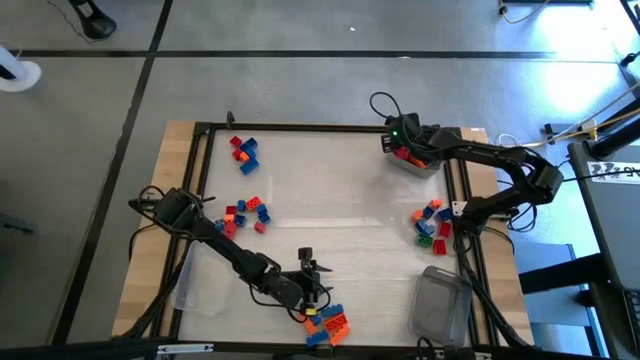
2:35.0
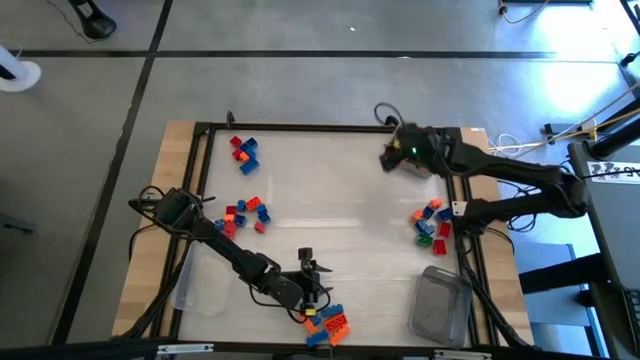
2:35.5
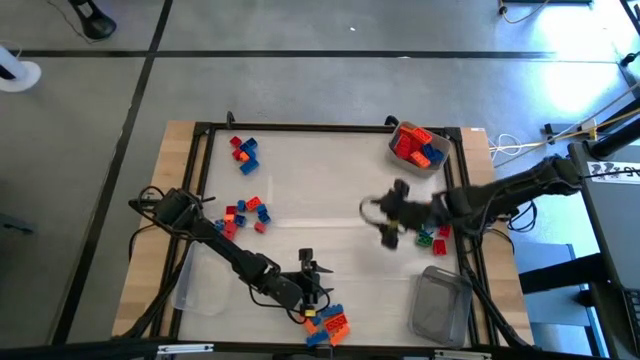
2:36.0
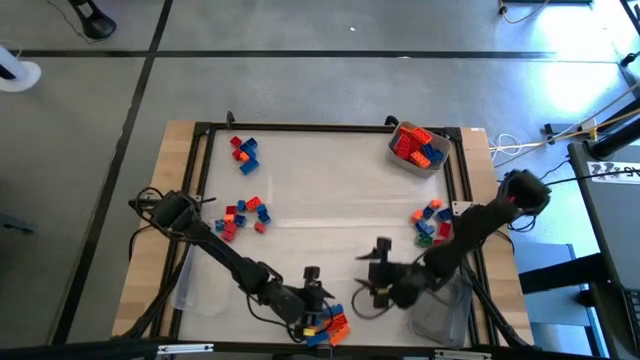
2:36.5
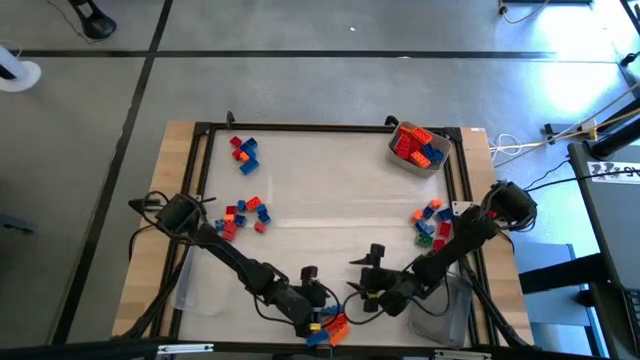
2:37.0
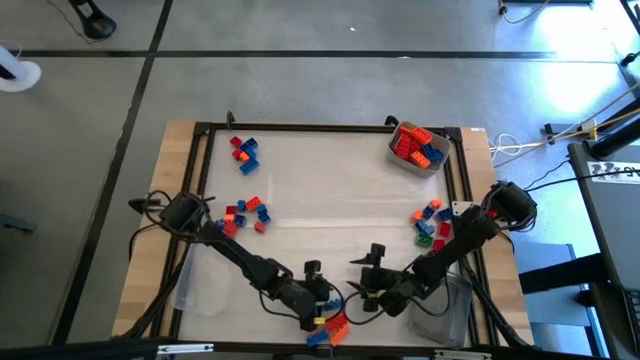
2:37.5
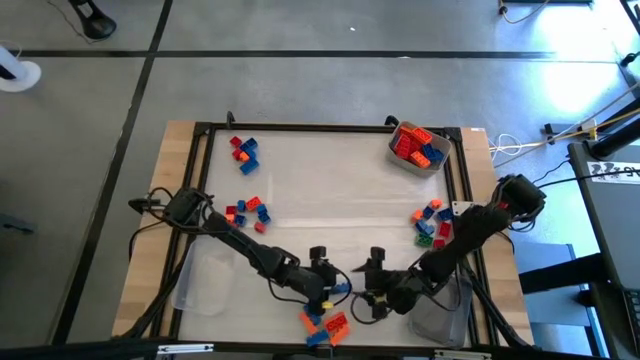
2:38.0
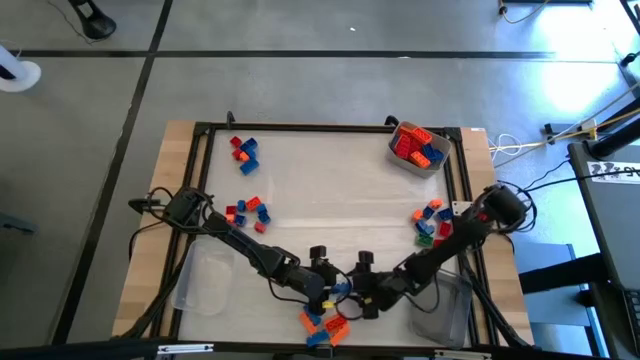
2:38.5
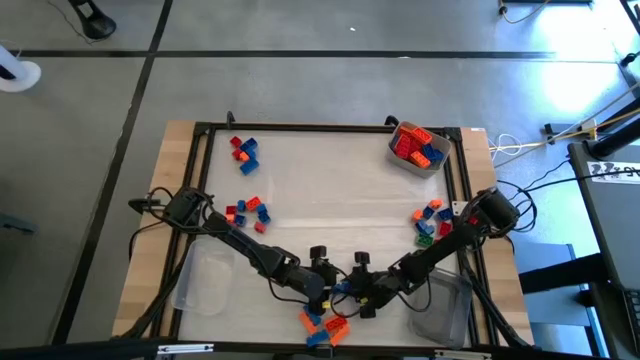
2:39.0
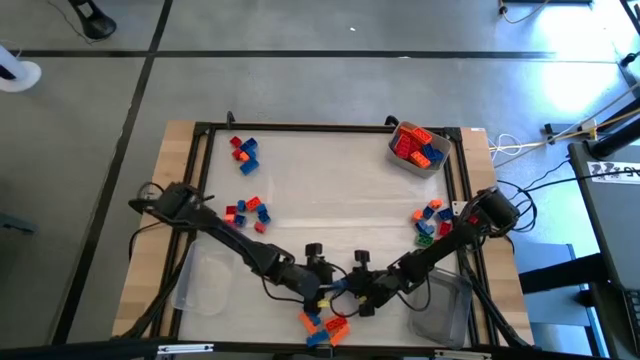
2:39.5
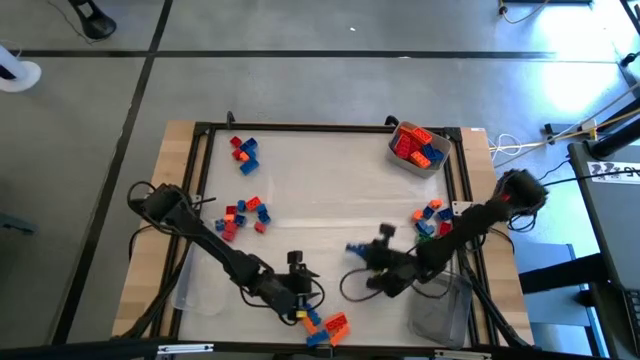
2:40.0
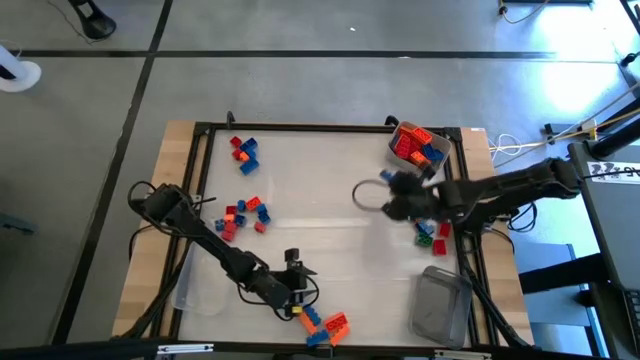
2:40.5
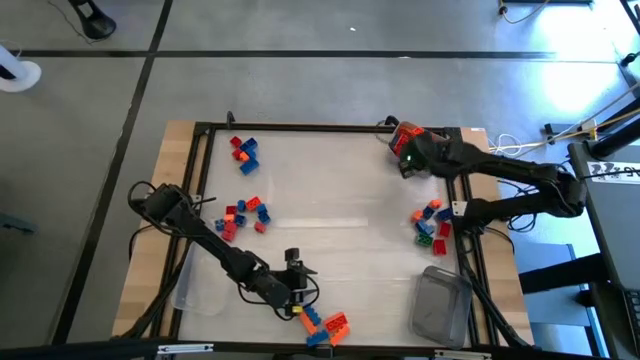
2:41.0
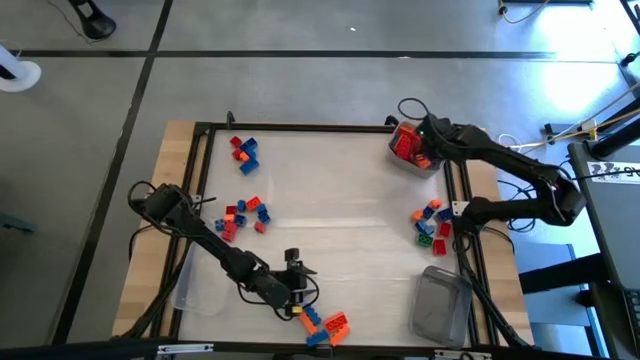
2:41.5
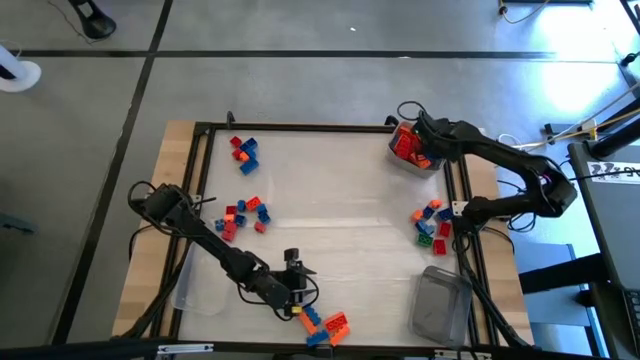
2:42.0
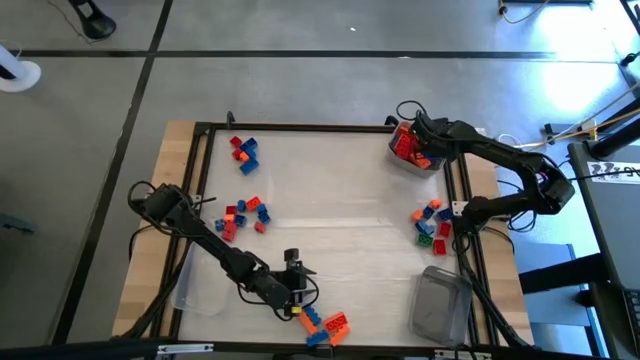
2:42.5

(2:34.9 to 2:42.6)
Task: Sort blocks by size
Put the blue game piece into the gray bin

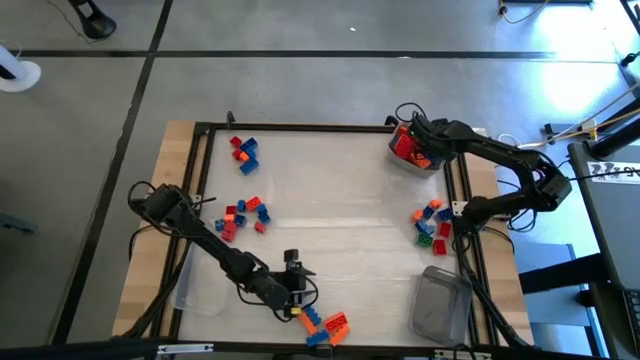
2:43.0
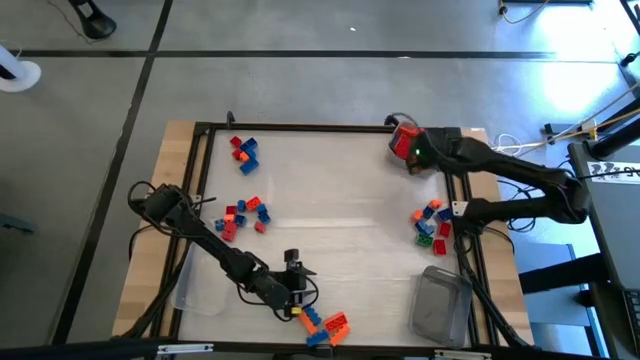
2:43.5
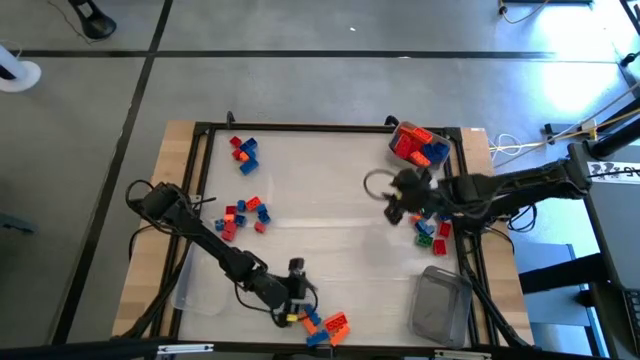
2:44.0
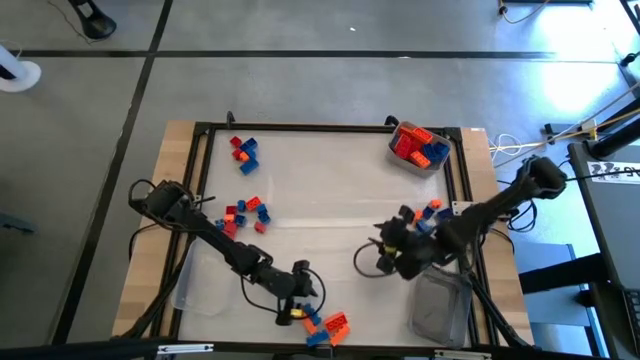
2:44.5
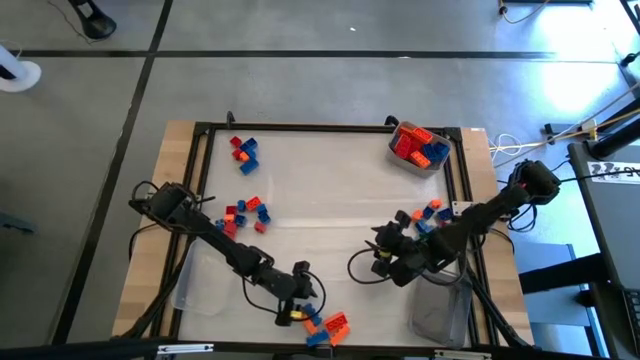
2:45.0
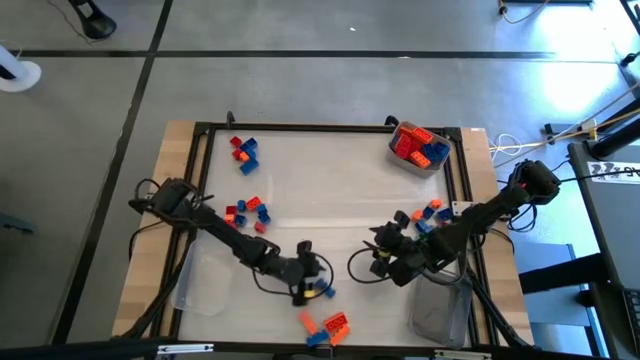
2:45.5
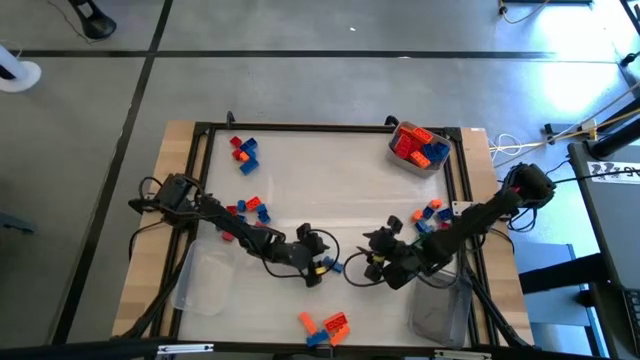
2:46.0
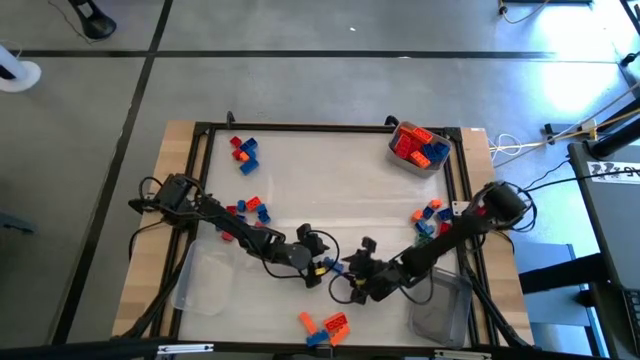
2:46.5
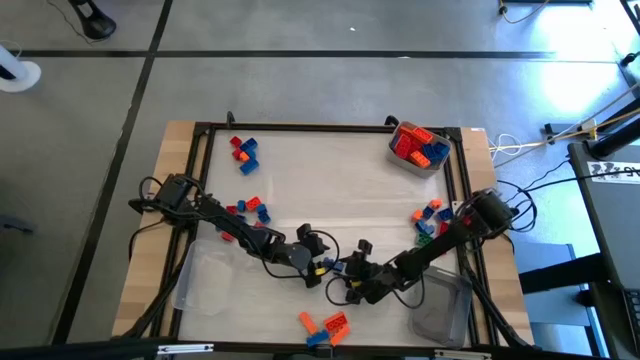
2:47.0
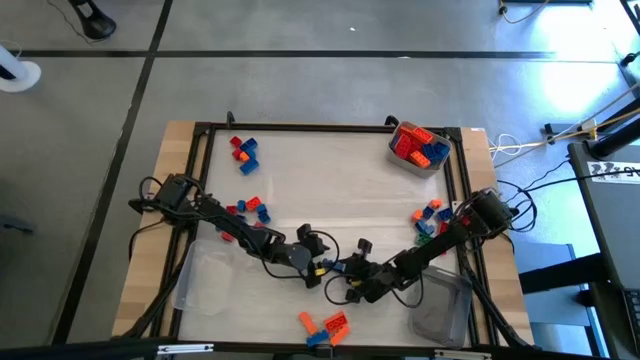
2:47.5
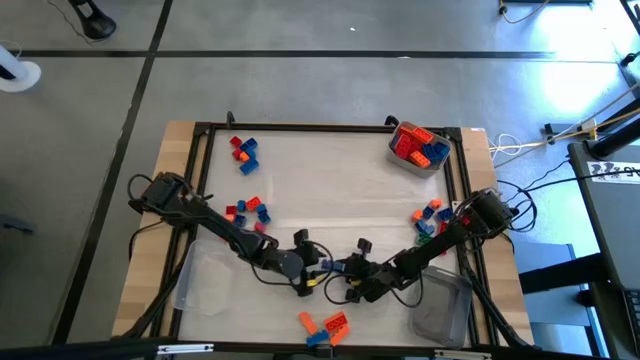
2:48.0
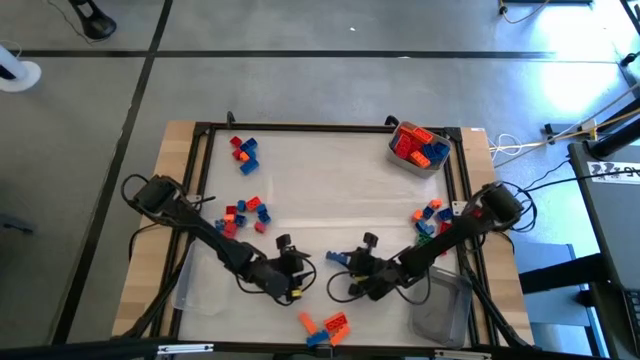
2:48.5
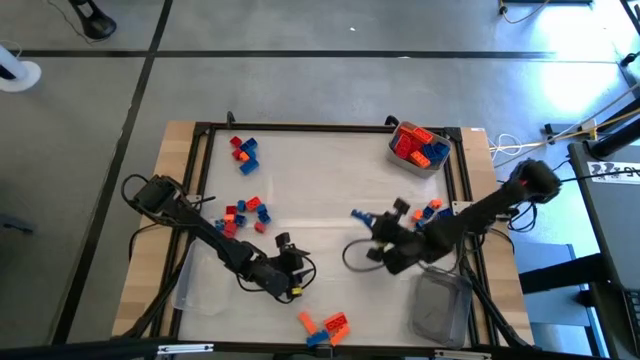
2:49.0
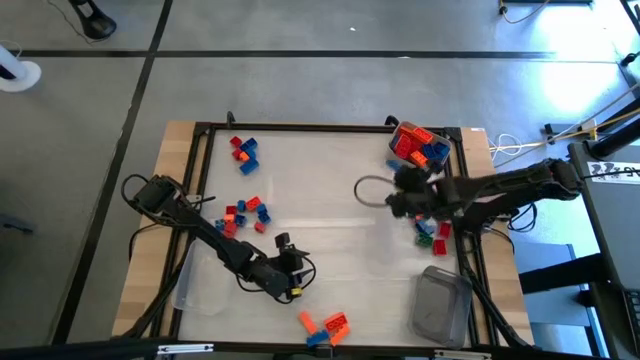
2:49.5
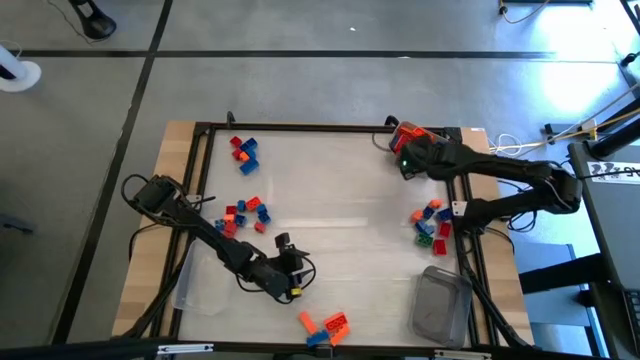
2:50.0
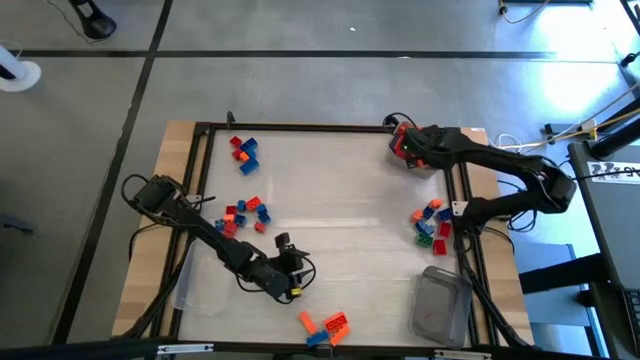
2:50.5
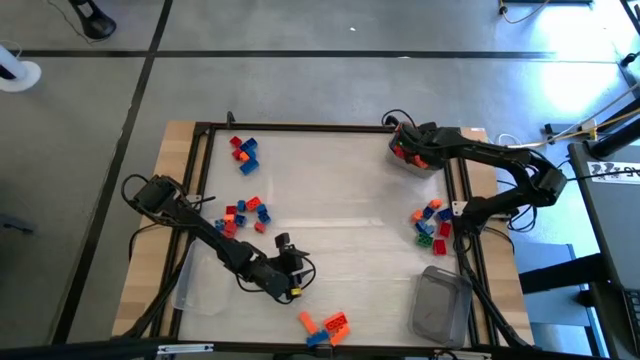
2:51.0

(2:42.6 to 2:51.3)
Put the blue game piece into the gray bin

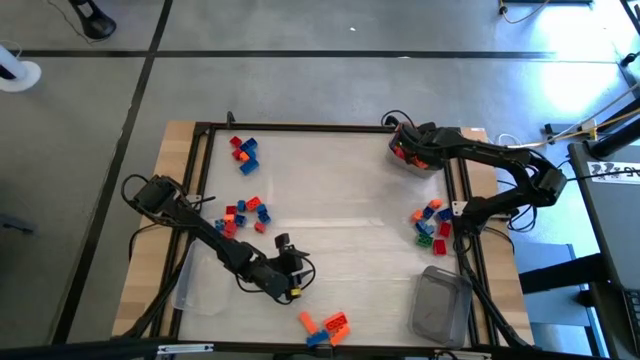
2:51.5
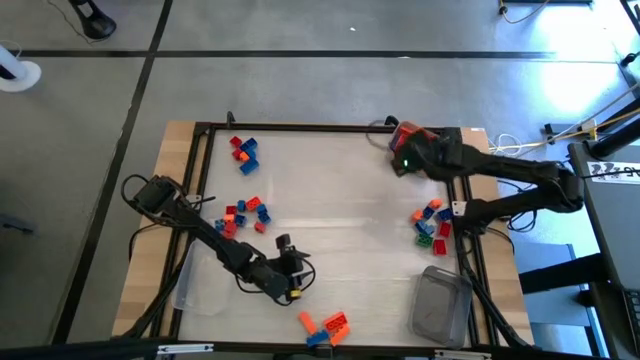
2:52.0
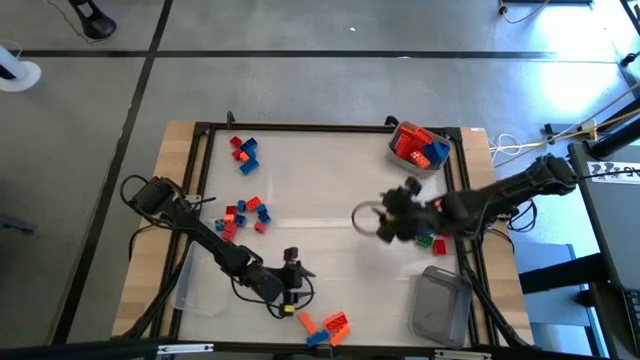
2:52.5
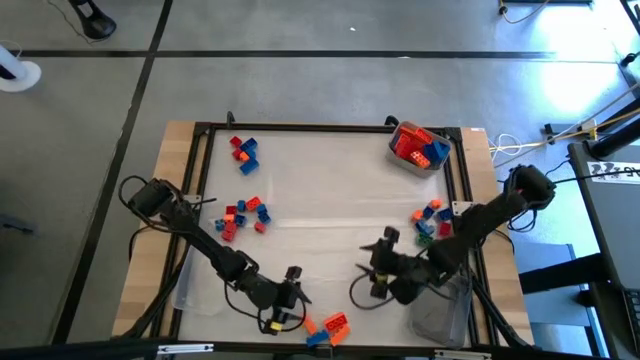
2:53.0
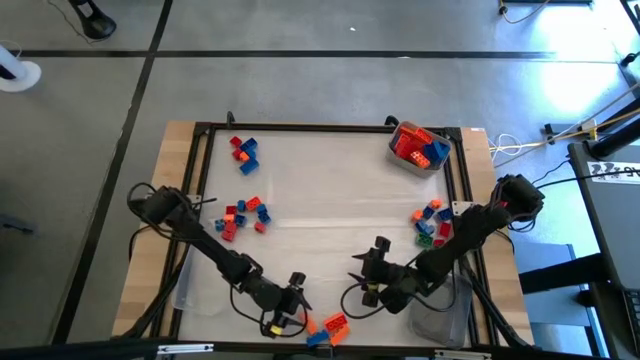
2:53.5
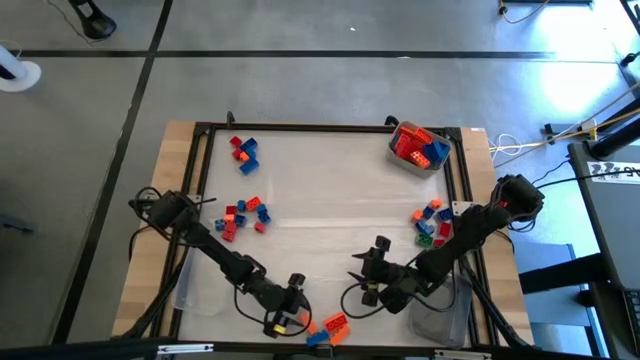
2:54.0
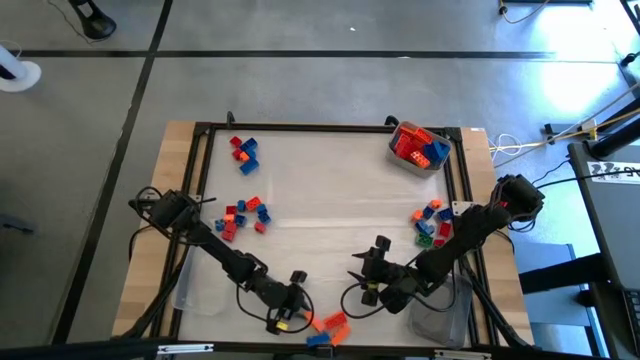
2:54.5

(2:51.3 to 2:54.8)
Put the orange game piece into the gray bin
